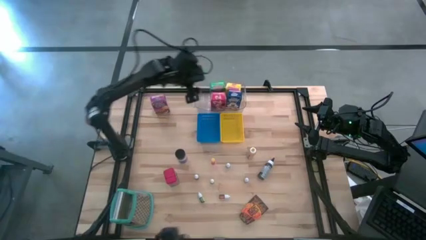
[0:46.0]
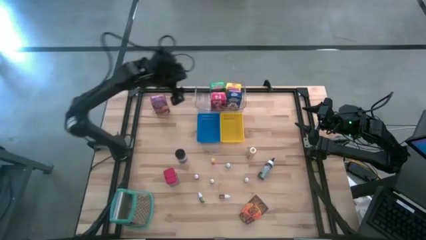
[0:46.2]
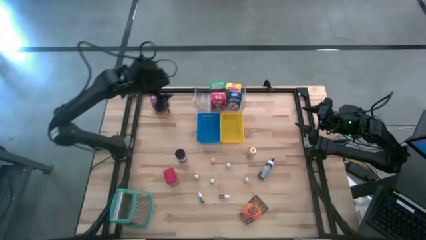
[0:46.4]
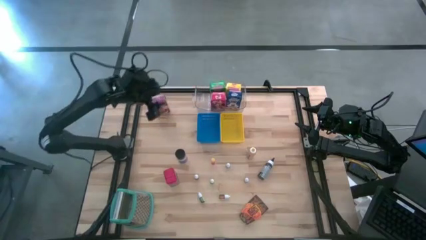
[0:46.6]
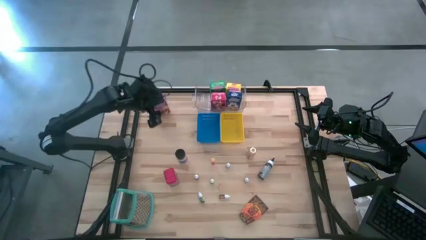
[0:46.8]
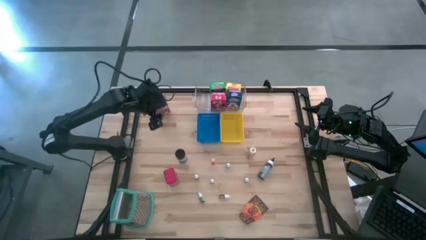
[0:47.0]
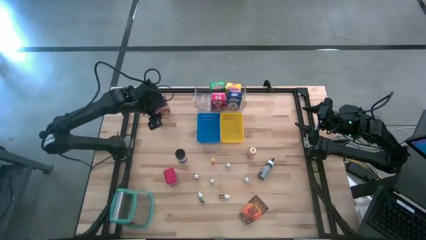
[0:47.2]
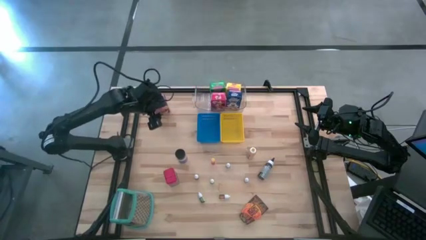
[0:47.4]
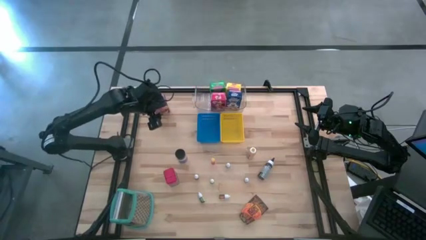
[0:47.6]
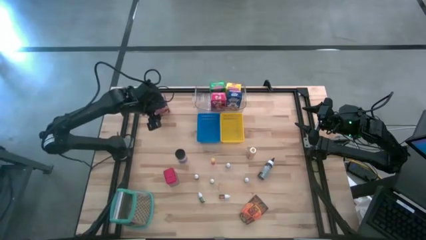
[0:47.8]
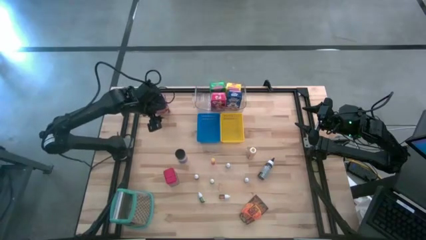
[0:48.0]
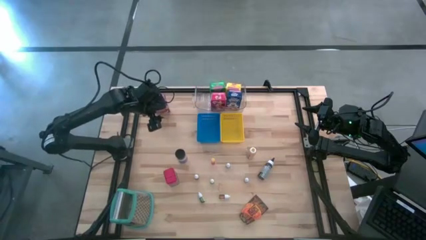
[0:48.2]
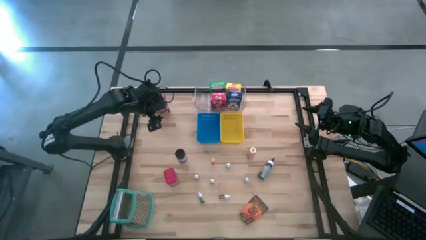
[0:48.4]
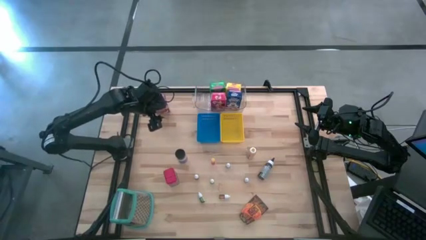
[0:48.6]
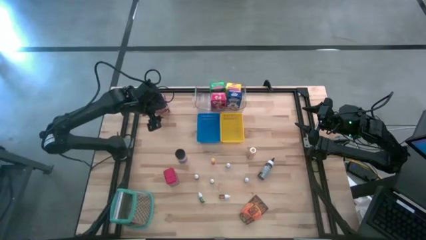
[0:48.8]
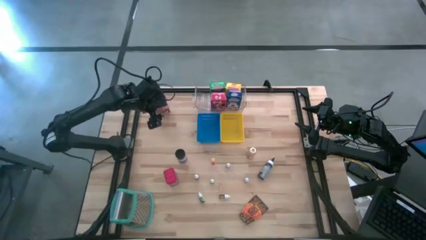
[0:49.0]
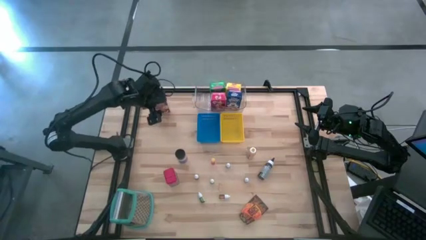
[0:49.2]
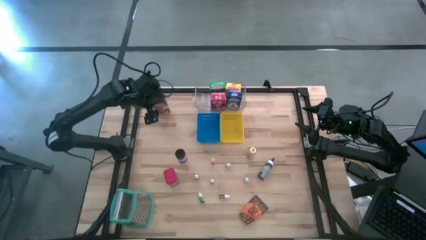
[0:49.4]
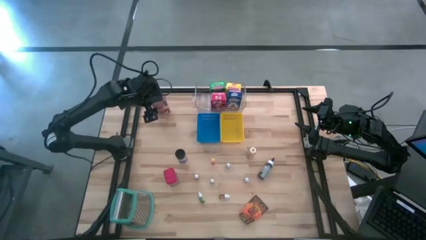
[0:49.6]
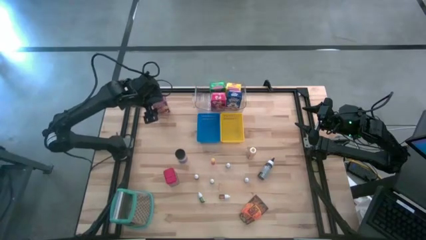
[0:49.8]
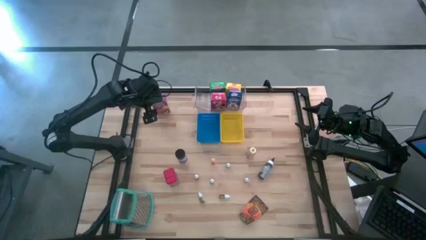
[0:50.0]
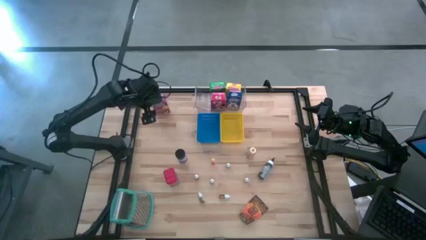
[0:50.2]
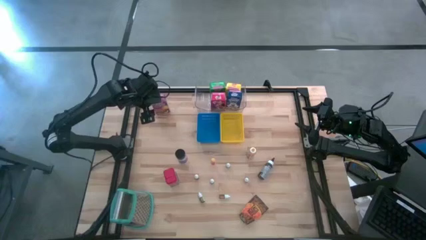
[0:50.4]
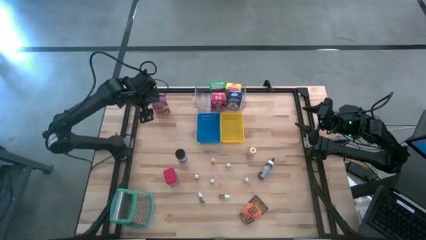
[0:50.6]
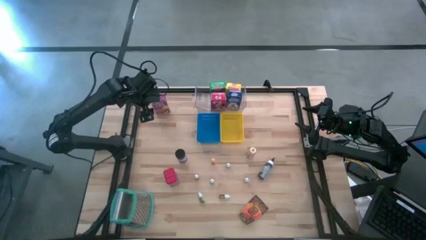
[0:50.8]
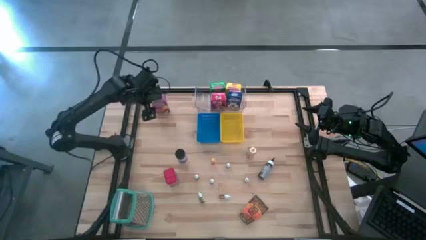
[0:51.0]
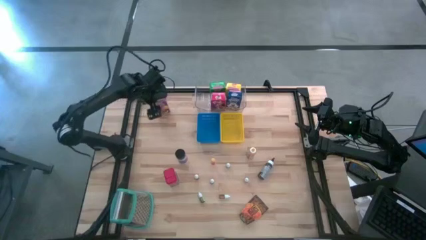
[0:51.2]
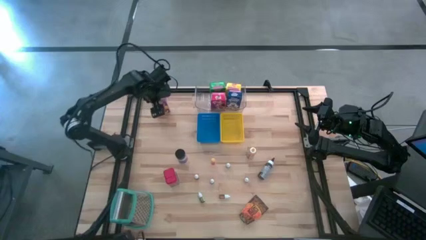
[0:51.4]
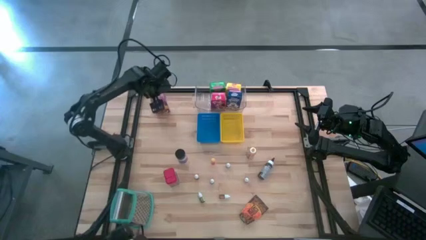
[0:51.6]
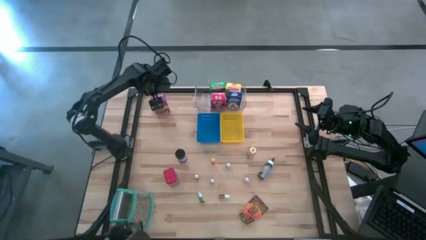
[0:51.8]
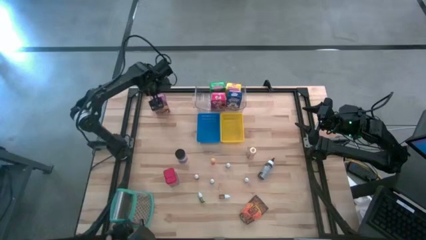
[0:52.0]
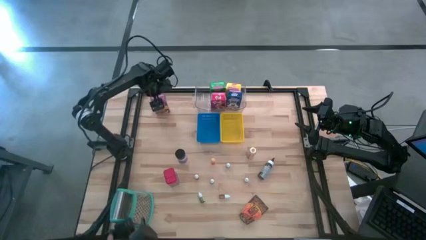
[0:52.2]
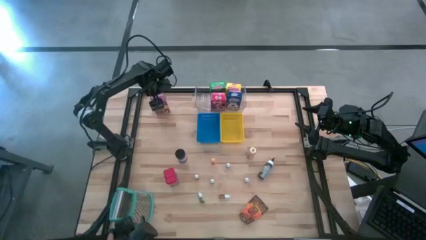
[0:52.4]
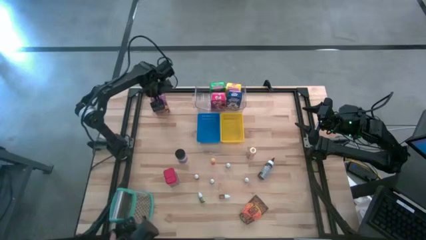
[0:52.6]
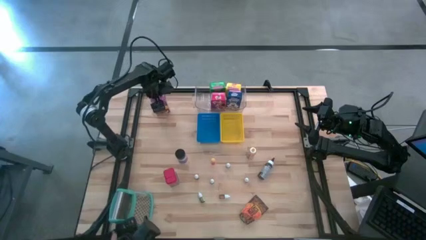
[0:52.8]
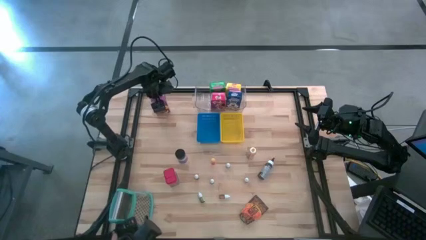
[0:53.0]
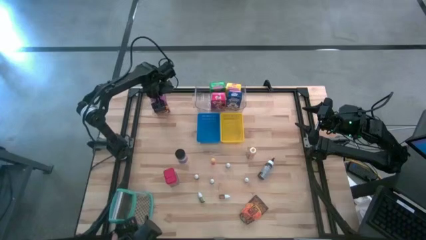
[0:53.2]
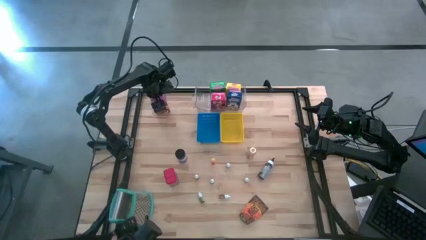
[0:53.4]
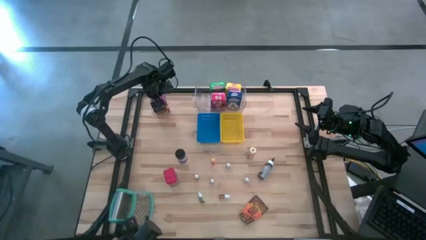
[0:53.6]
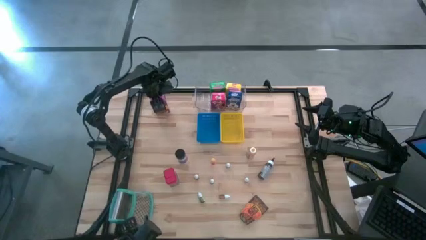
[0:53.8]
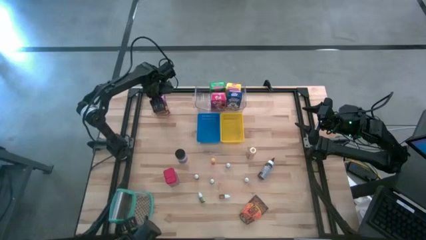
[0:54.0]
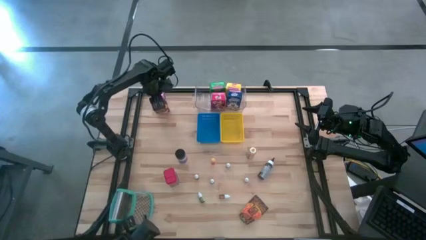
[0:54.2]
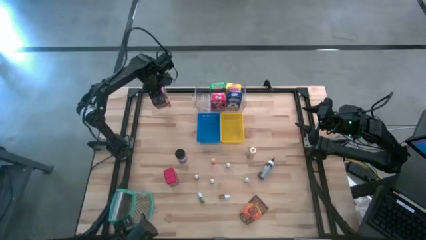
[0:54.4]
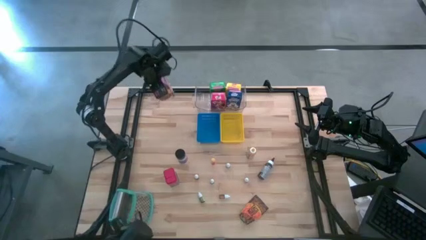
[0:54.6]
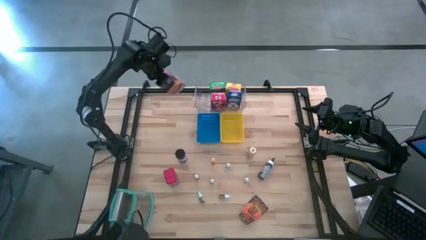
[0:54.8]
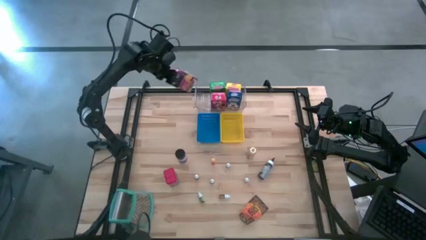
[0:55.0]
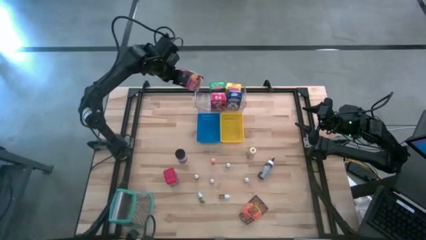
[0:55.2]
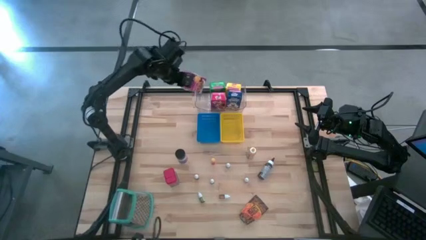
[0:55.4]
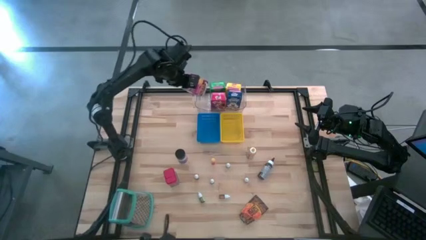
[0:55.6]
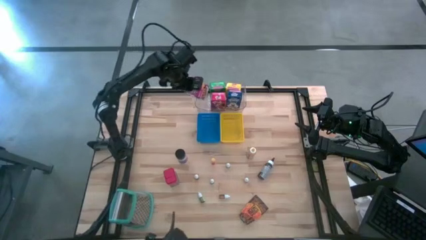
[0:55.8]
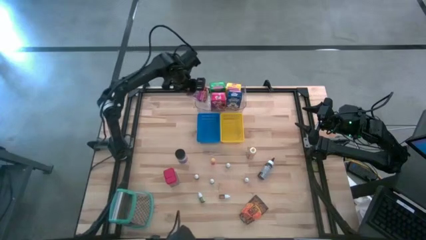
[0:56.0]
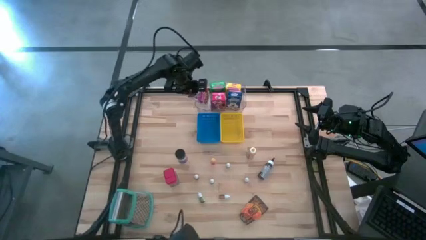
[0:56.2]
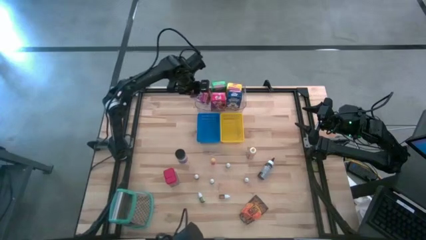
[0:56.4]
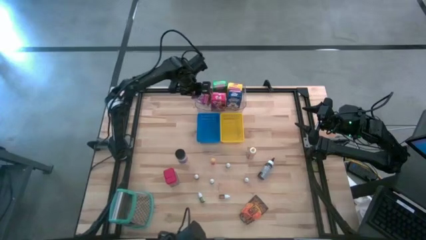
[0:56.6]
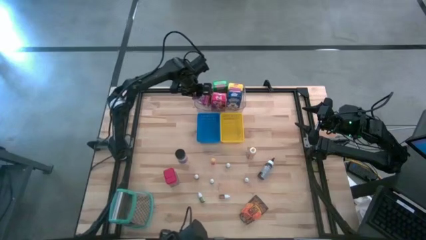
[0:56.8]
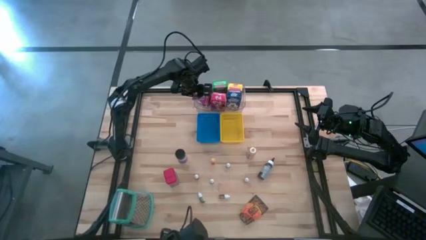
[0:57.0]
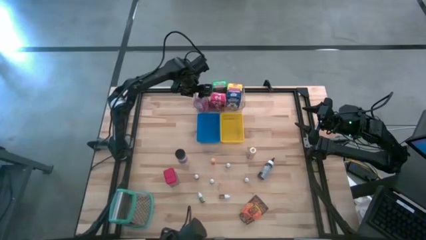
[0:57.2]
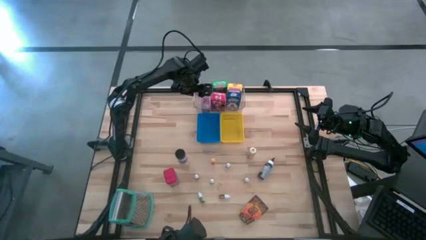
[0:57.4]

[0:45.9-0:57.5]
Task: Pick & Place Kitchen Items
Put the purple cereal box into the transparent bin

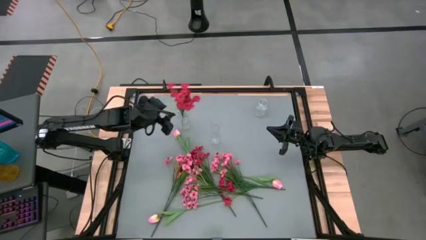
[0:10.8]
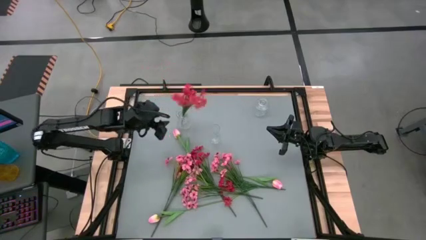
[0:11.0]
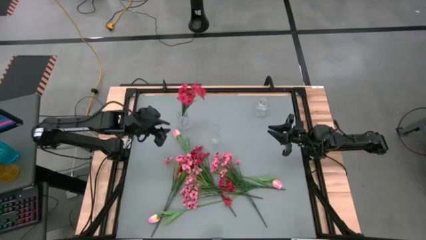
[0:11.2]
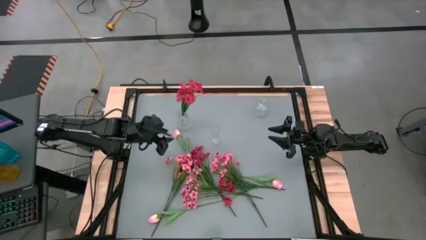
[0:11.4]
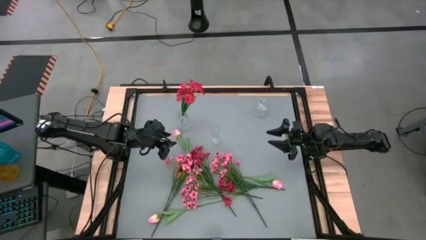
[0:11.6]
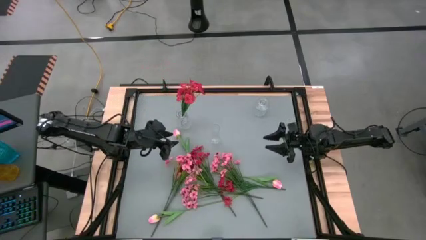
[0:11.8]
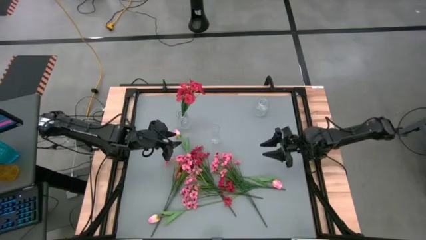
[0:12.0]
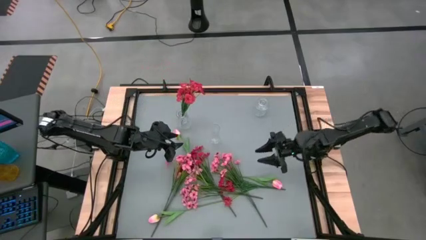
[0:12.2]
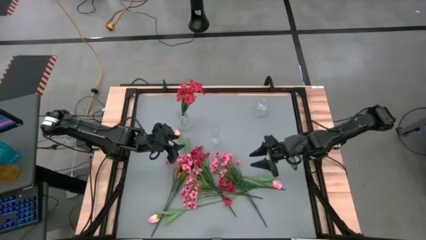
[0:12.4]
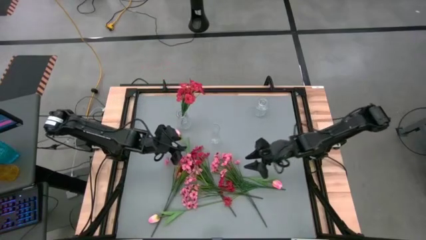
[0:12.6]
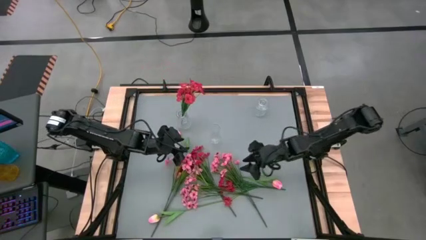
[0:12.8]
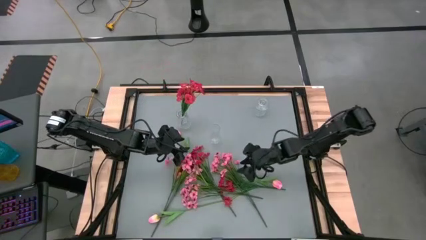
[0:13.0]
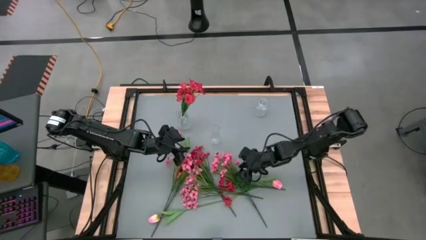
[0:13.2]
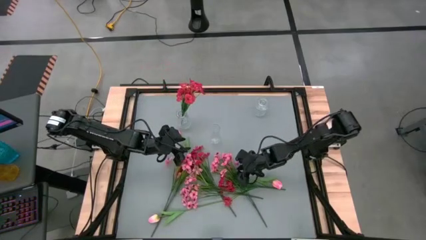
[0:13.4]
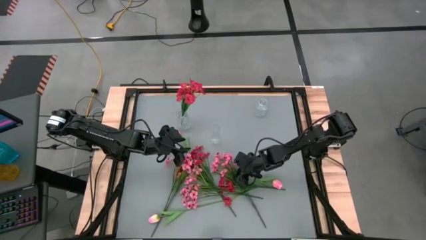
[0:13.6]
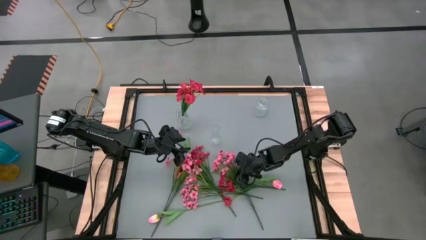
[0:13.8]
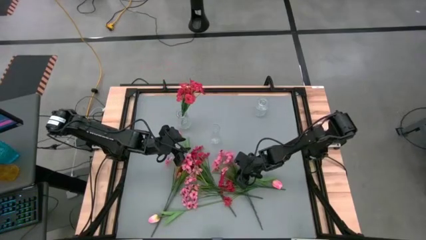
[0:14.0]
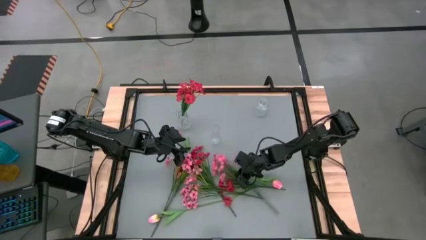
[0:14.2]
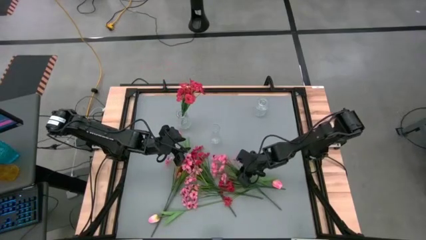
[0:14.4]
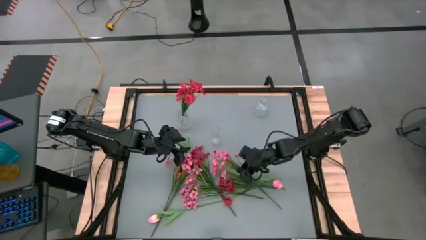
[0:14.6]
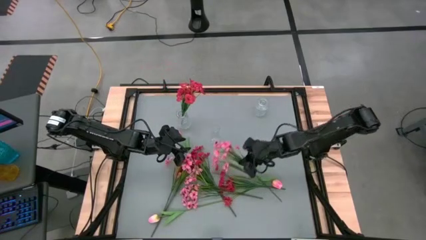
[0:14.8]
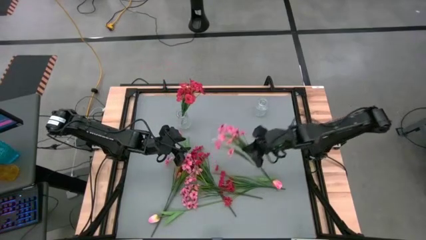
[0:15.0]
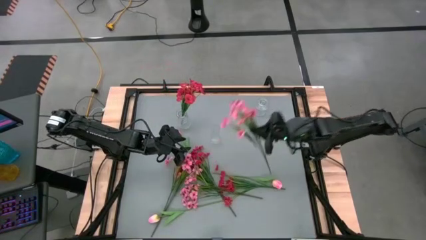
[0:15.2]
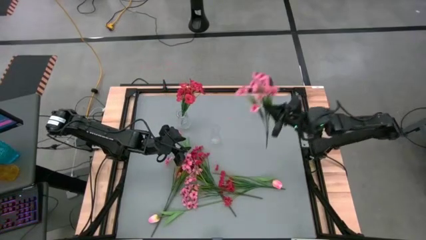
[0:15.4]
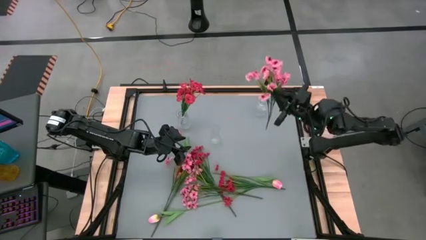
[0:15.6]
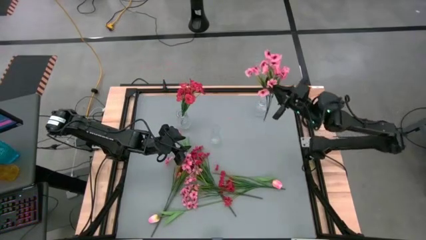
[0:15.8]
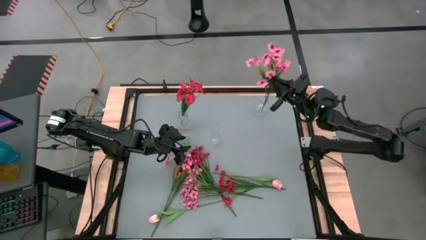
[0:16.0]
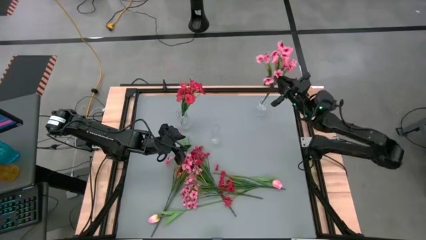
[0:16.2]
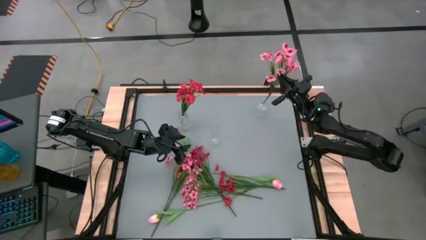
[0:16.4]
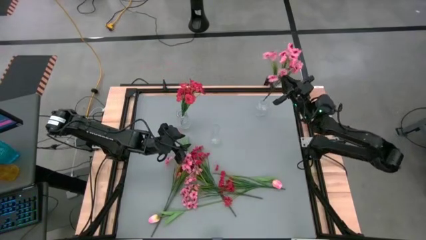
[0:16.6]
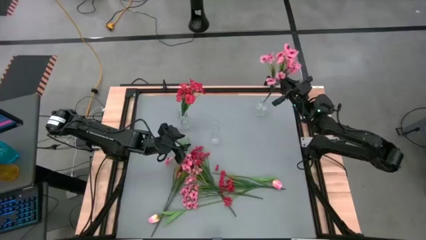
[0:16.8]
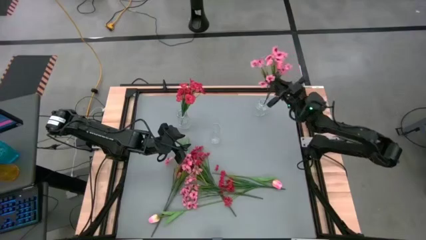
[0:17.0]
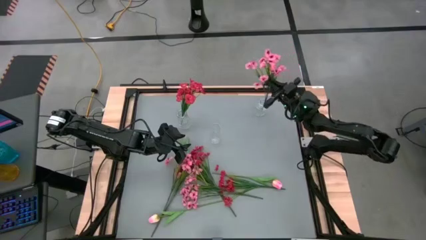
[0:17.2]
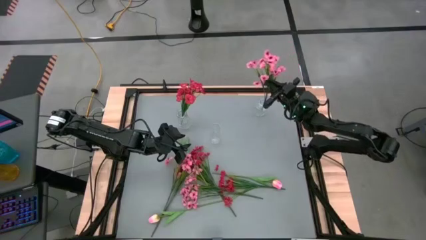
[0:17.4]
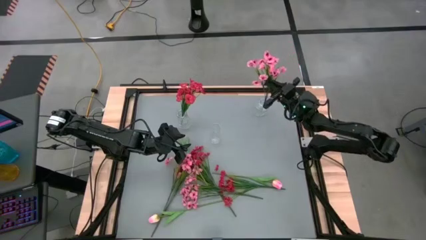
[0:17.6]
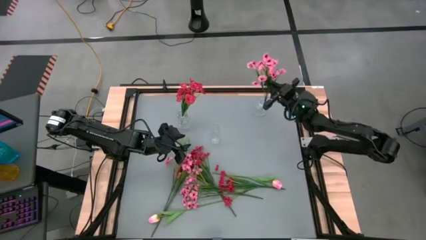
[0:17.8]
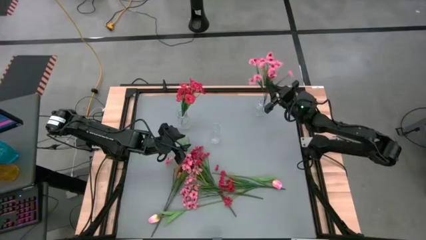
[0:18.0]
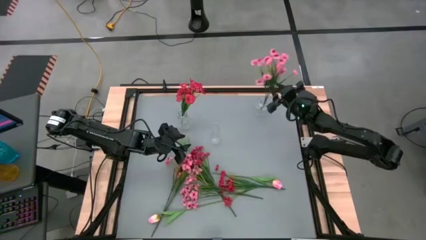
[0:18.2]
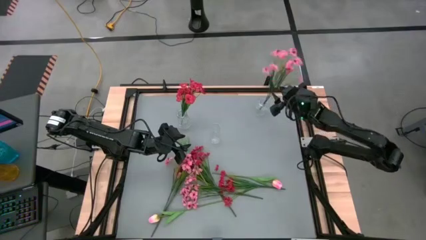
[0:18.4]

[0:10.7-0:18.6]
Task: Sort flowers into vase by color
Put the pink flower into the top right transparent vase
